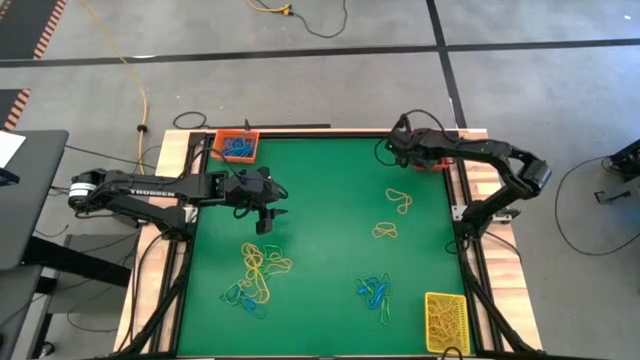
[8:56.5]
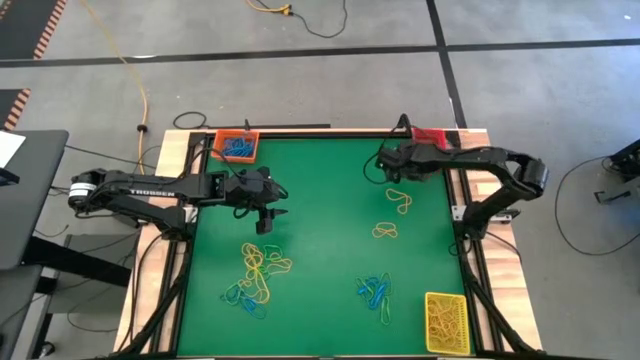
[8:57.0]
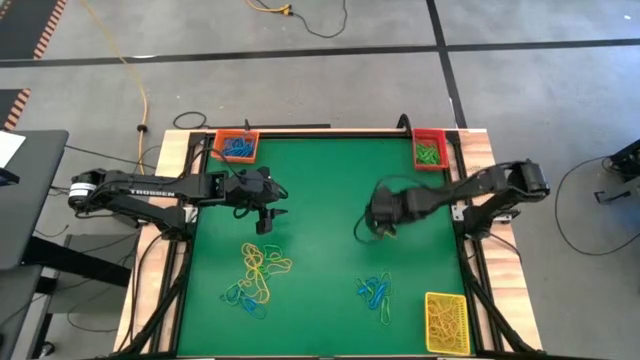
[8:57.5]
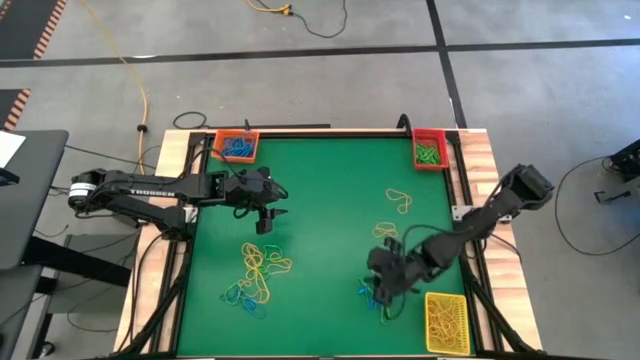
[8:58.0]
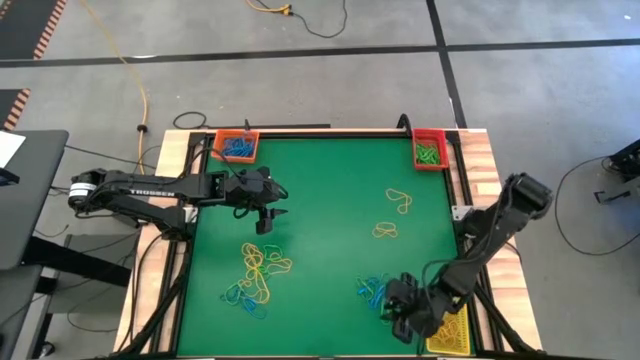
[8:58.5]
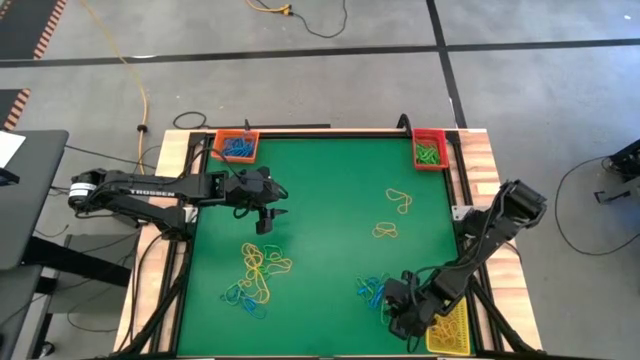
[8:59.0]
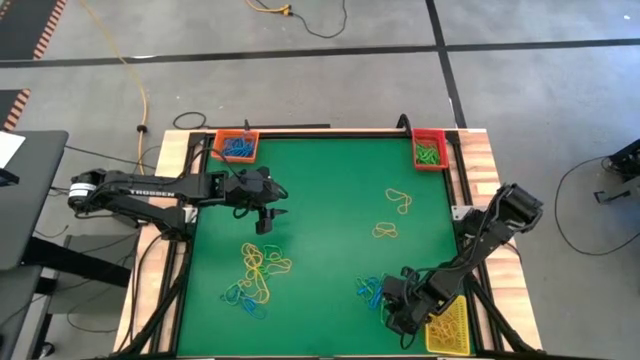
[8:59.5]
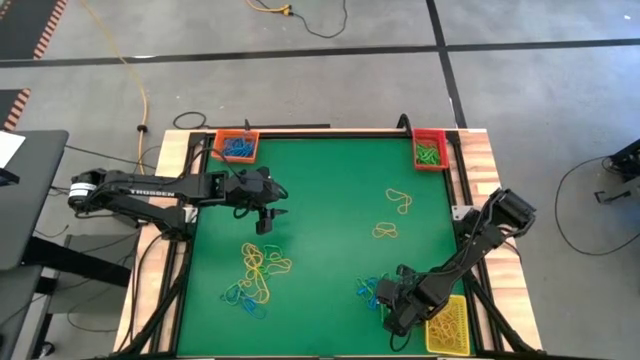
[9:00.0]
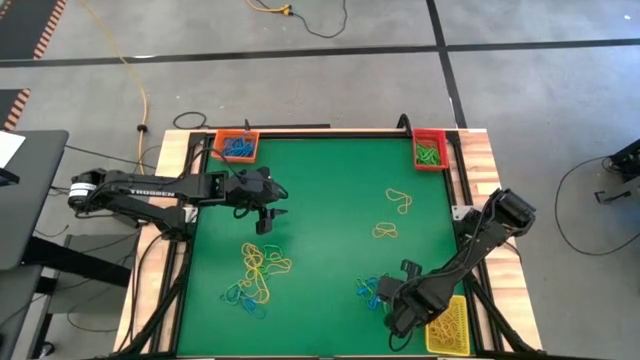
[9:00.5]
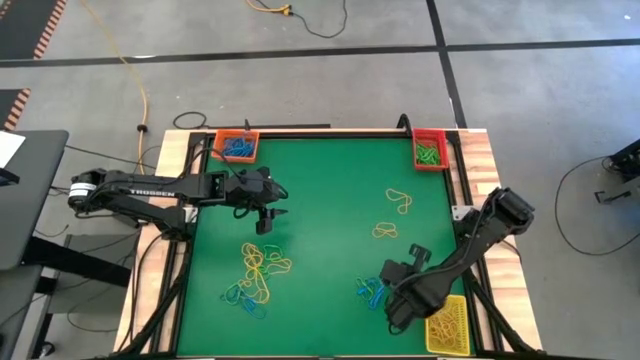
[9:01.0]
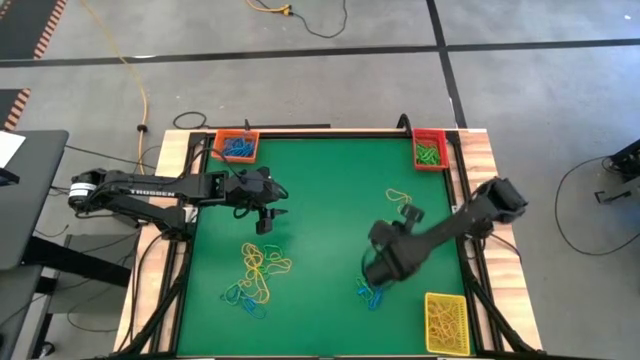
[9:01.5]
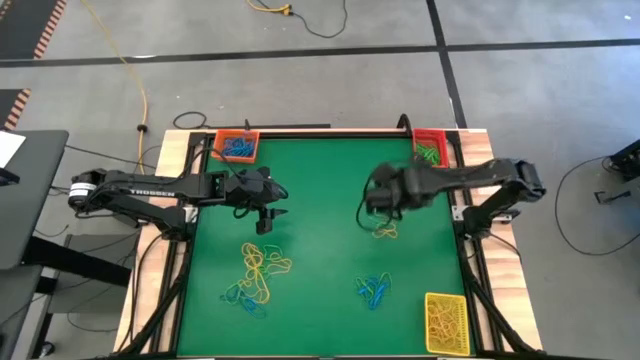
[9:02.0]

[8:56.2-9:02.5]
Task: Sort rubber bands into baskets
Put the bottom right green rubber band into the red bin

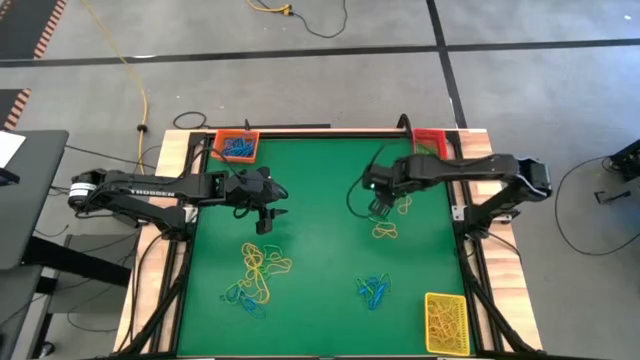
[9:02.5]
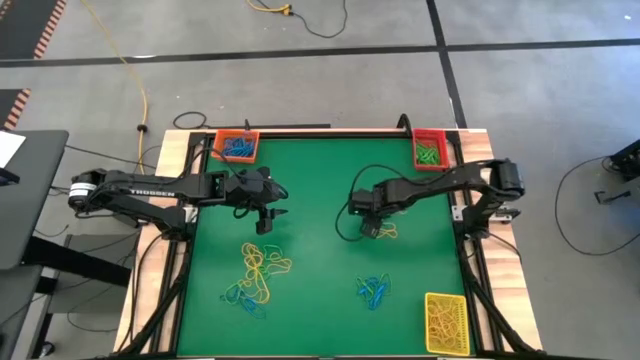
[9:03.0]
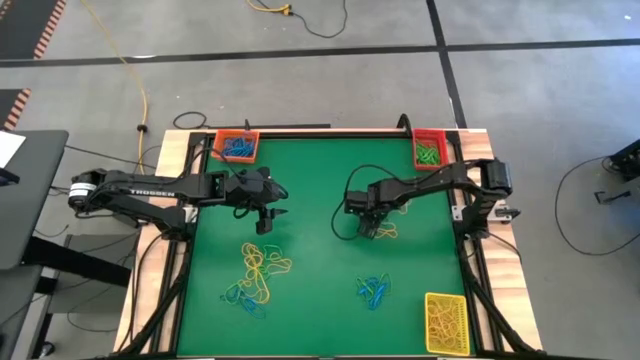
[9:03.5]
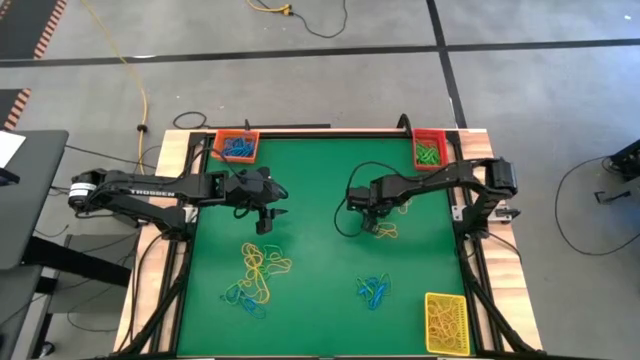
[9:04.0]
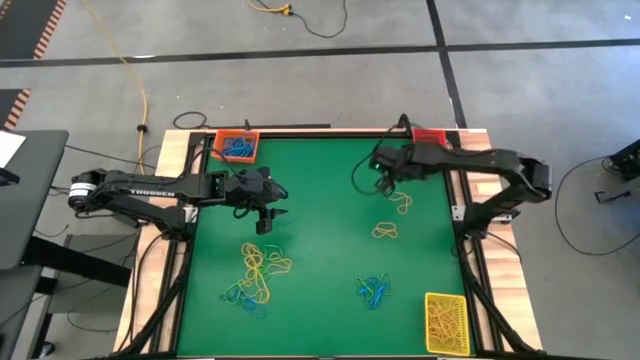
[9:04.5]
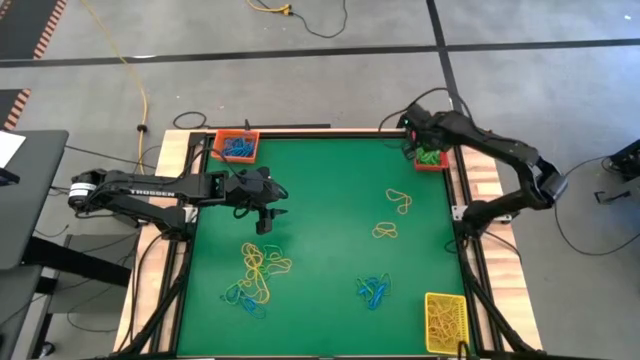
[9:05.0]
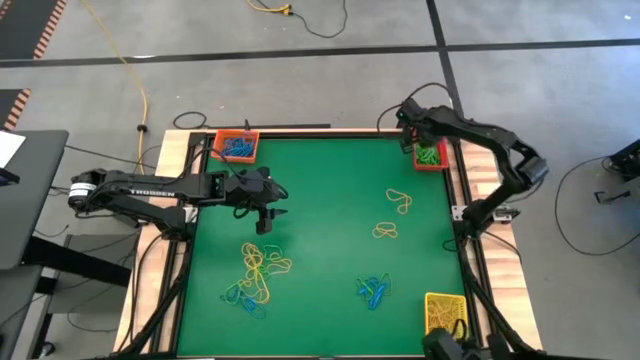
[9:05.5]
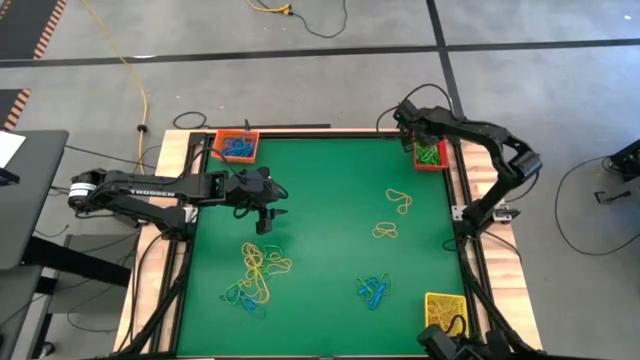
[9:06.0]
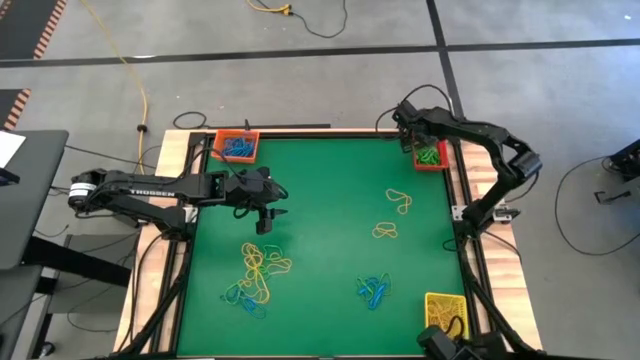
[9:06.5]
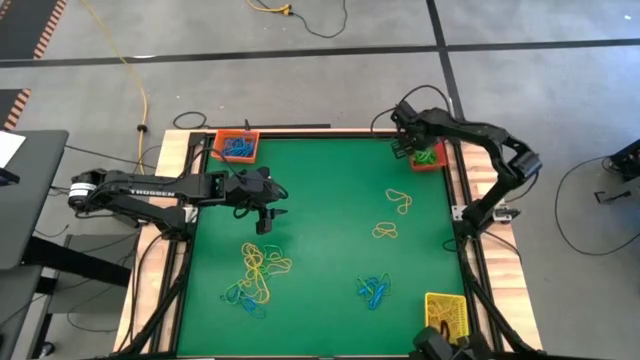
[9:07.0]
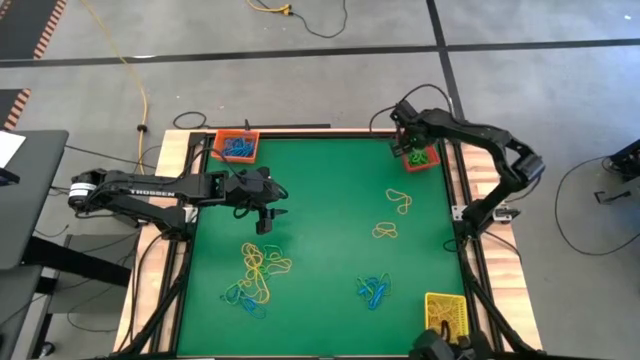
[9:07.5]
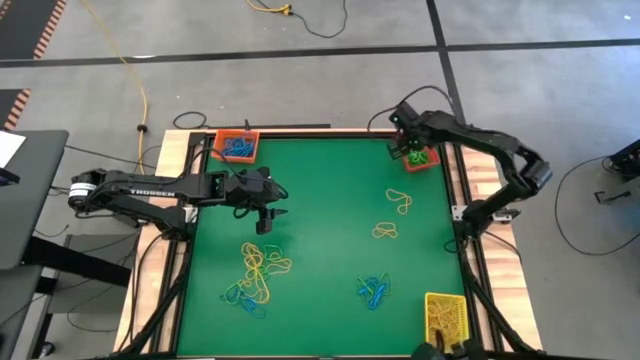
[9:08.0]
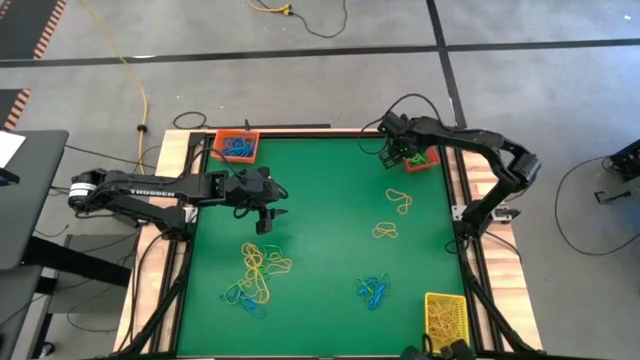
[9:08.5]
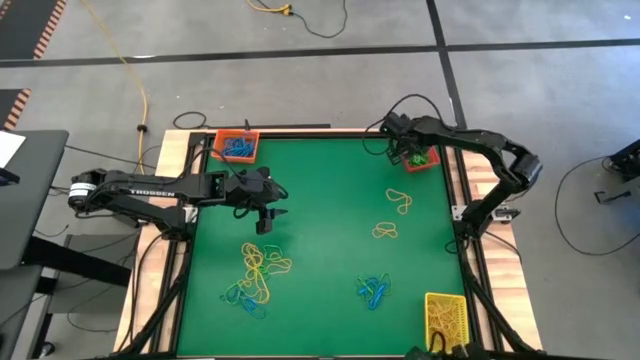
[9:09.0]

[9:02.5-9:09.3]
Put the bottom right green rubber band into the red bin

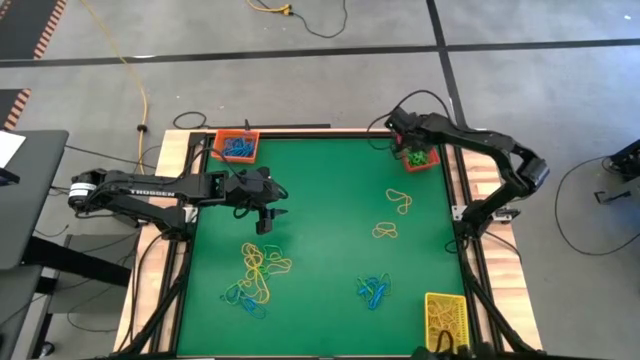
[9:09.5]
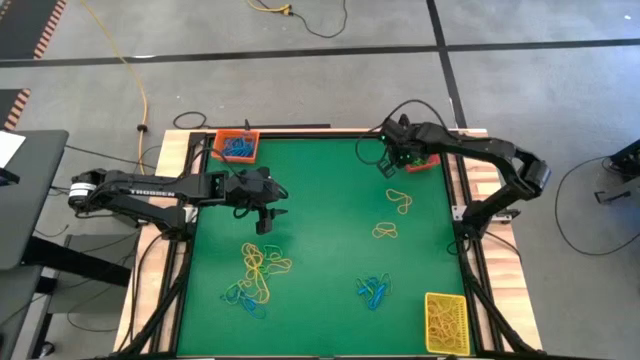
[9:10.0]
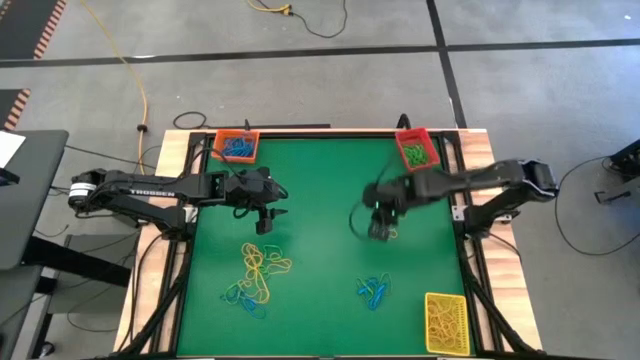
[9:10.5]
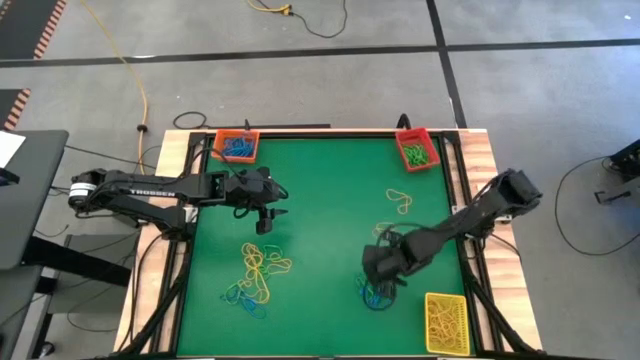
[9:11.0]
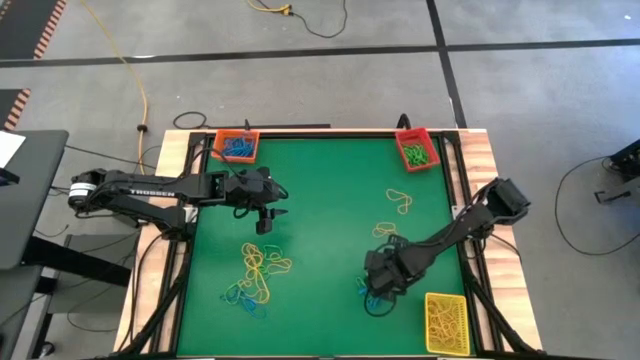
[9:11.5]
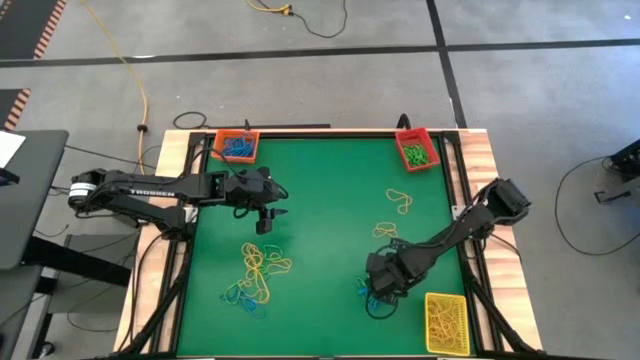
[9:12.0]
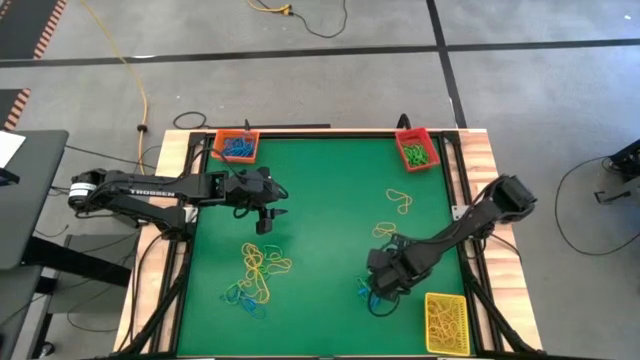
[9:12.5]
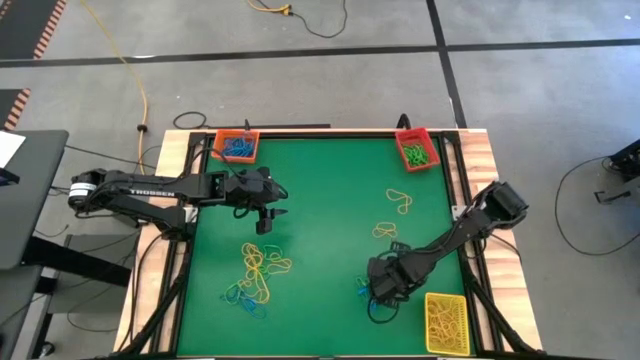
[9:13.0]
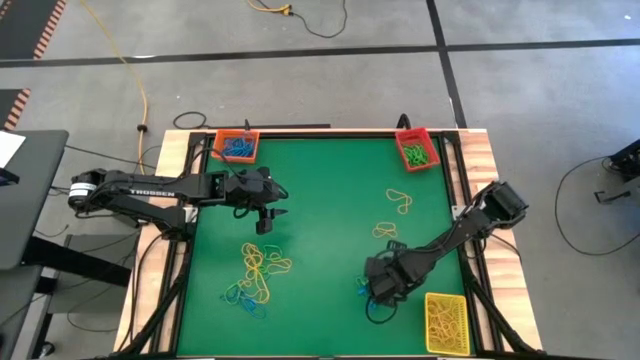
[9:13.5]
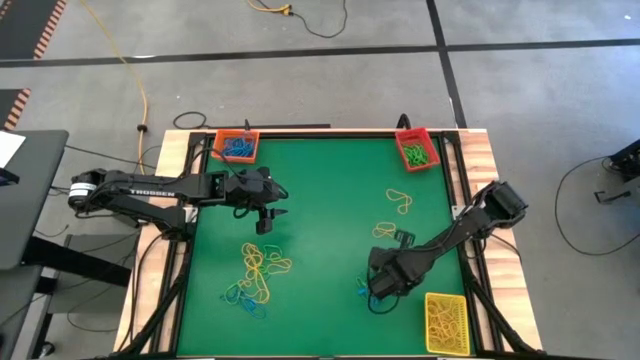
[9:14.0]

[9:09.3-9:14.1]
Put the bottom right green rubber band into the red bin

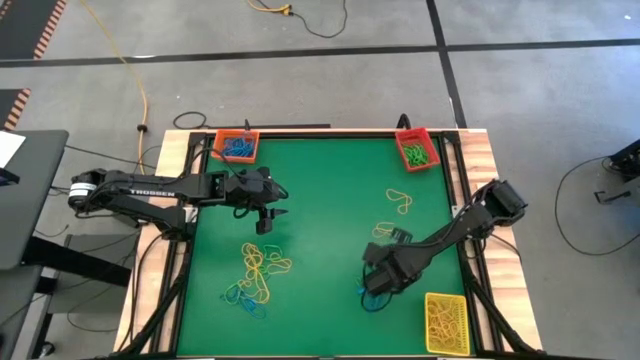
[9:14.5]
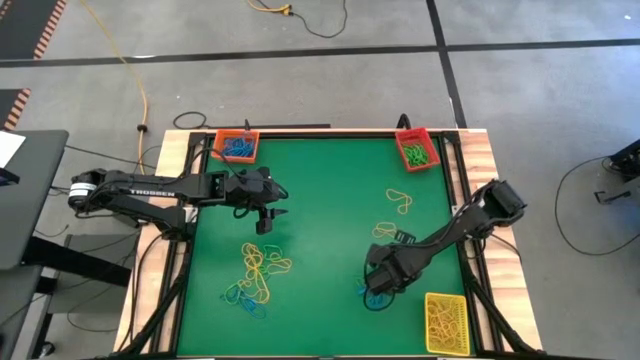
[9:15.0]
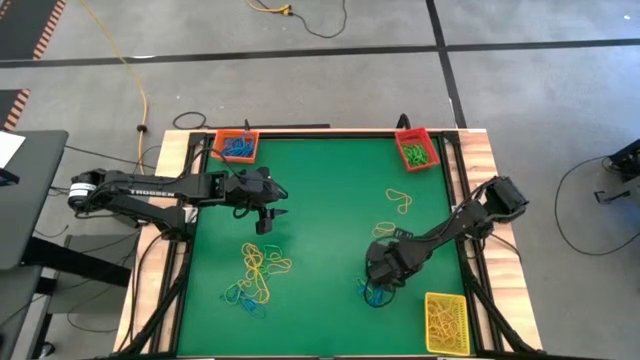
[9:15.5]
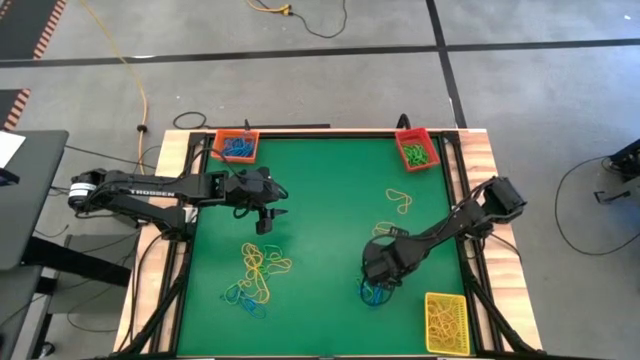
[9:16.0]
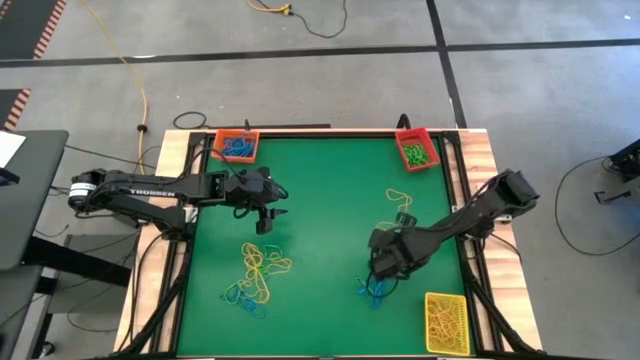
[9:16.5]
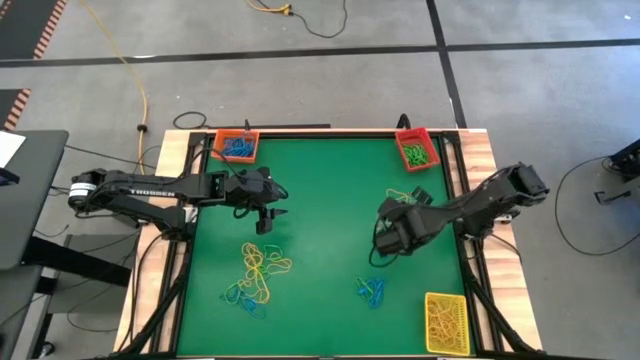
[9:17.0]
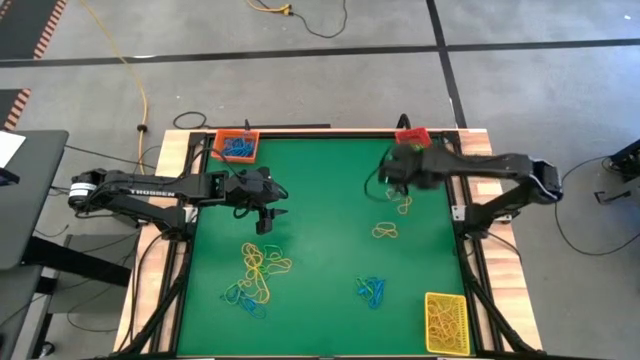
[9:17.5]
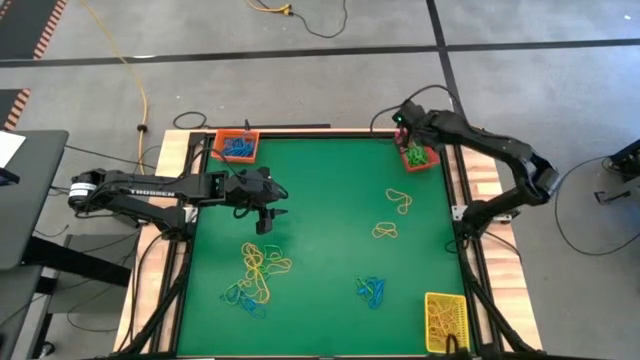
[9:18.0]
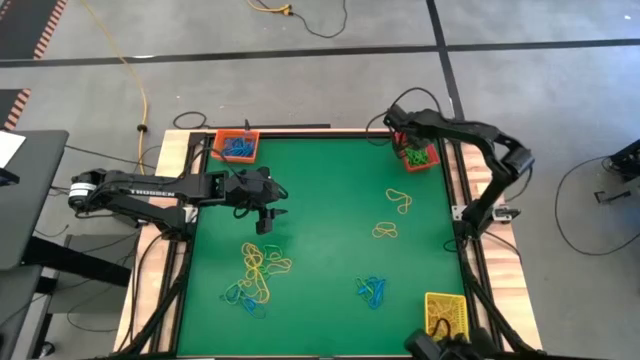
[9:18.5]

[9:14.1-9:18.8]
Put the bottom right green rubber band into the red bin

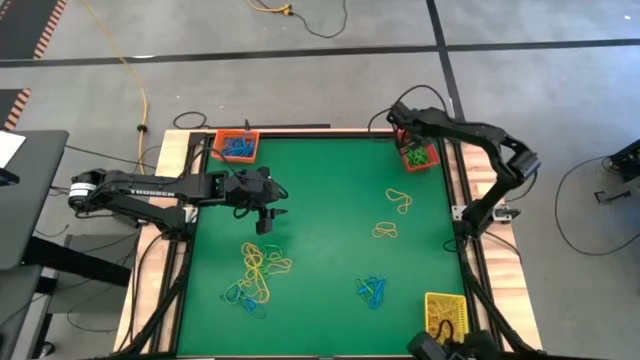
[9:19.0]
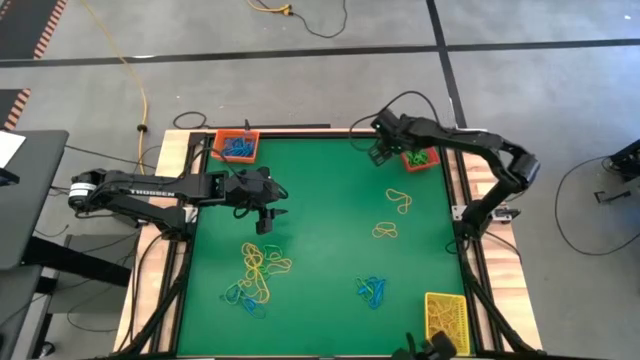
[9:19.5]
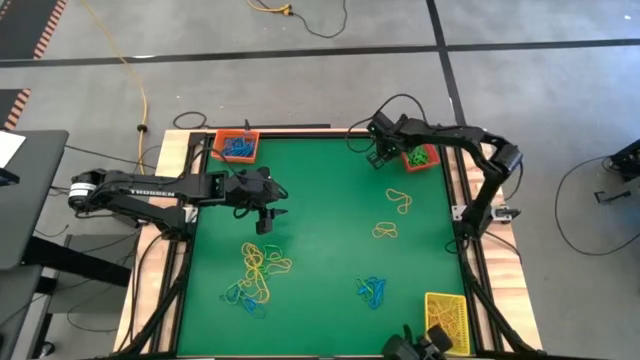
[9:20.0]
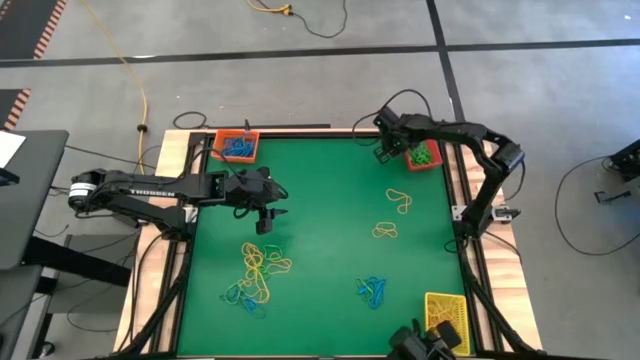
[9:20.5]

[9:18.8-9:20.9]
Adjust the red basket
